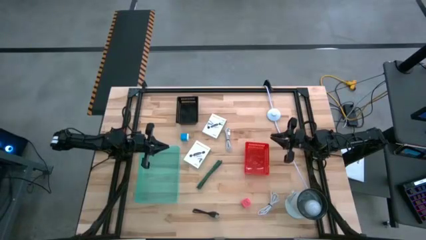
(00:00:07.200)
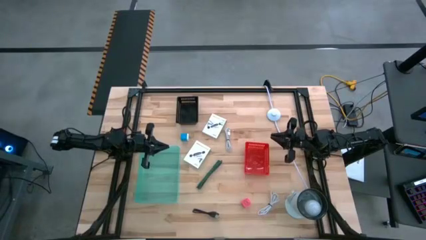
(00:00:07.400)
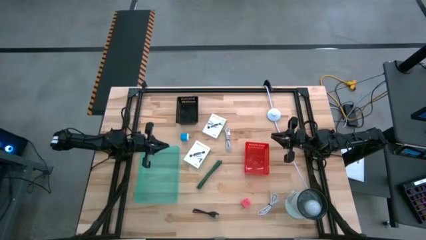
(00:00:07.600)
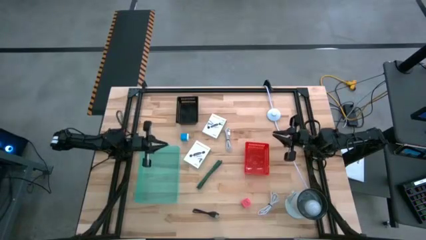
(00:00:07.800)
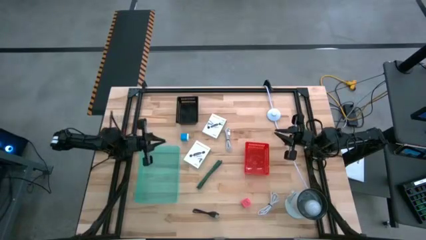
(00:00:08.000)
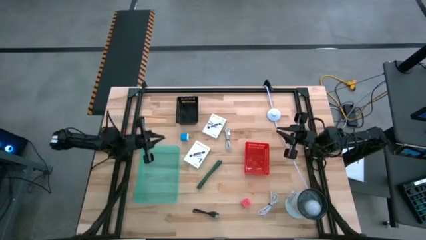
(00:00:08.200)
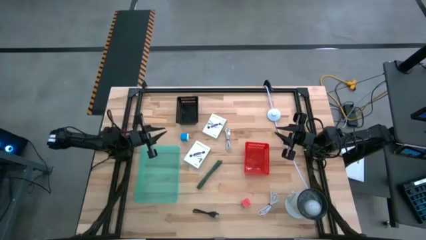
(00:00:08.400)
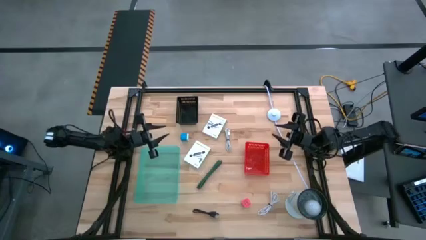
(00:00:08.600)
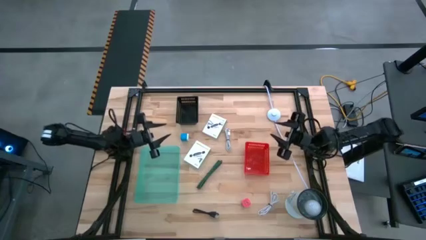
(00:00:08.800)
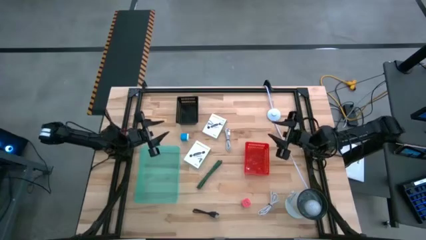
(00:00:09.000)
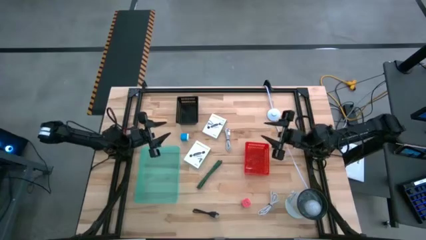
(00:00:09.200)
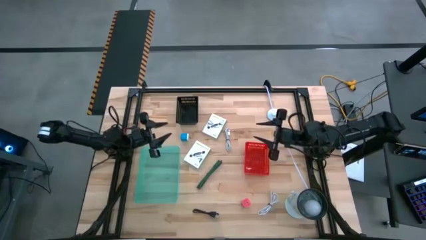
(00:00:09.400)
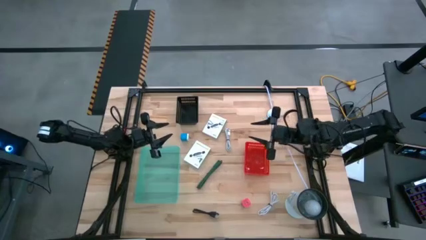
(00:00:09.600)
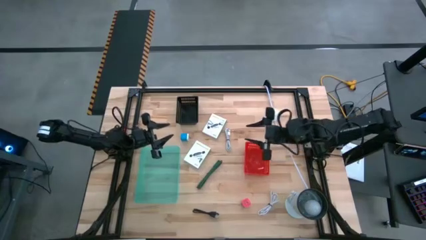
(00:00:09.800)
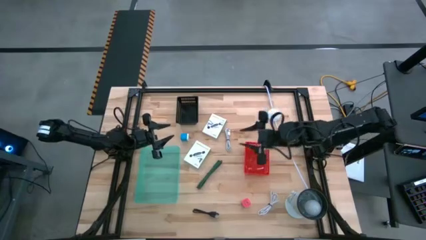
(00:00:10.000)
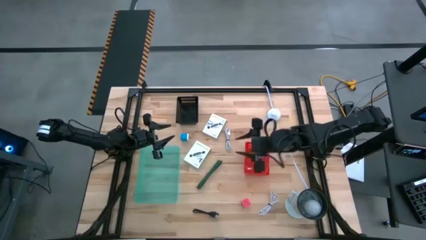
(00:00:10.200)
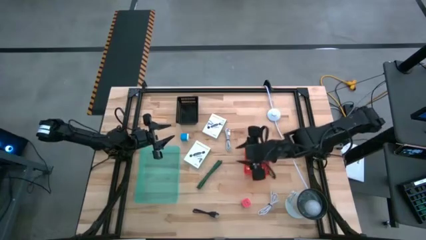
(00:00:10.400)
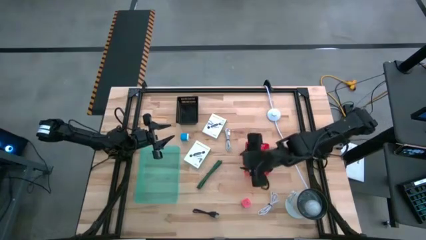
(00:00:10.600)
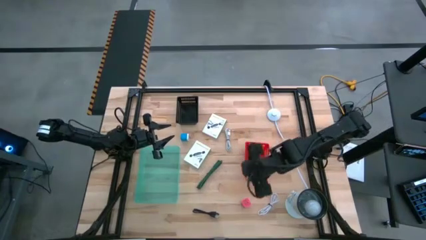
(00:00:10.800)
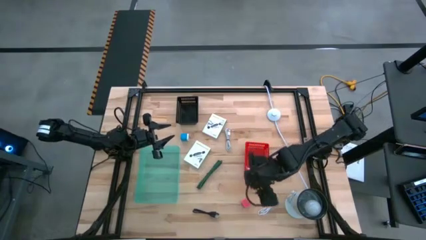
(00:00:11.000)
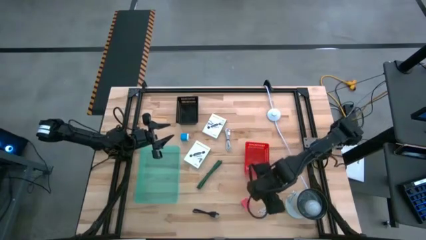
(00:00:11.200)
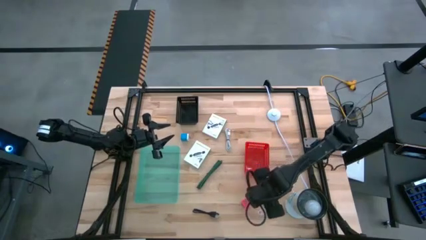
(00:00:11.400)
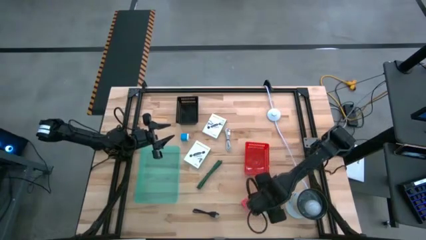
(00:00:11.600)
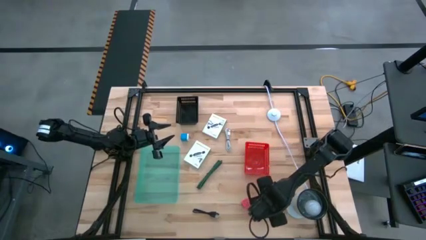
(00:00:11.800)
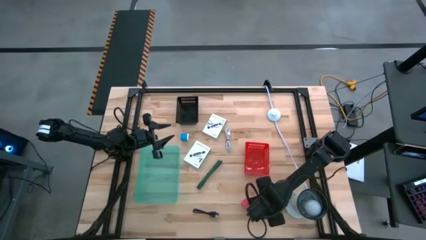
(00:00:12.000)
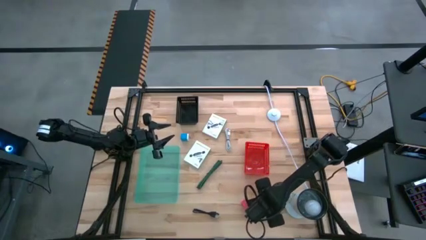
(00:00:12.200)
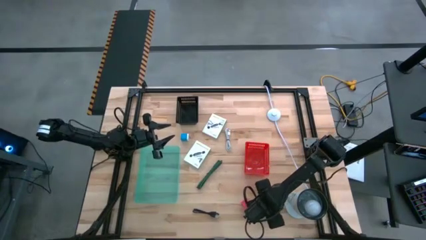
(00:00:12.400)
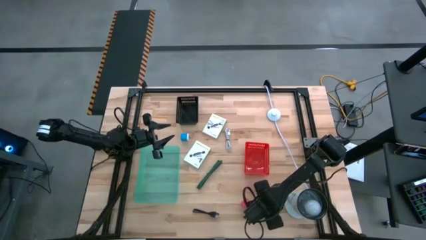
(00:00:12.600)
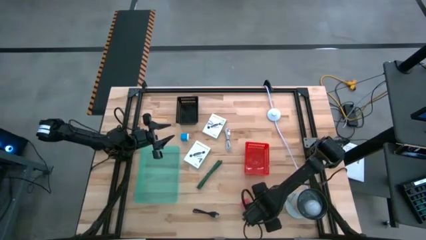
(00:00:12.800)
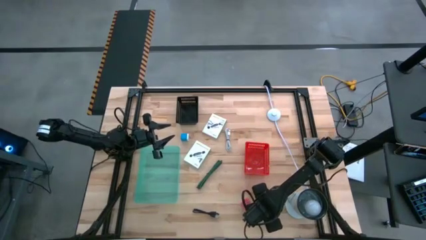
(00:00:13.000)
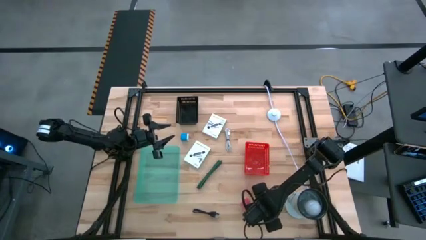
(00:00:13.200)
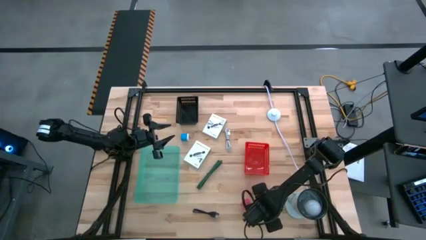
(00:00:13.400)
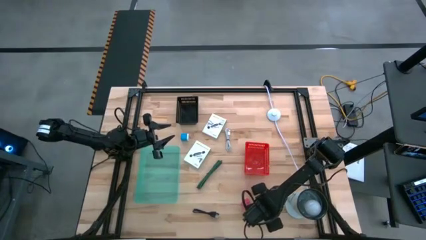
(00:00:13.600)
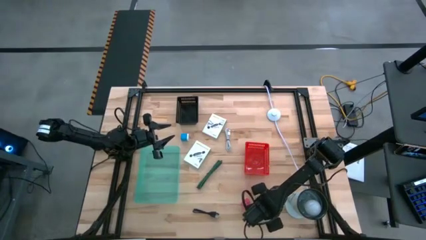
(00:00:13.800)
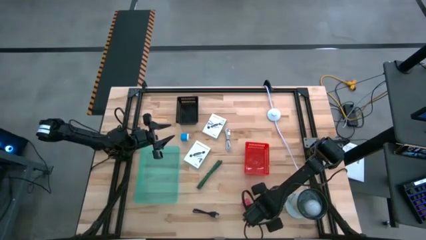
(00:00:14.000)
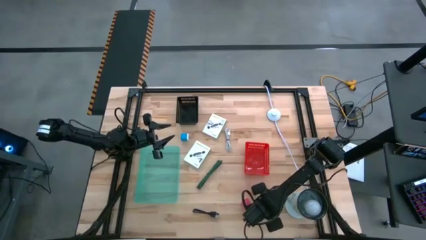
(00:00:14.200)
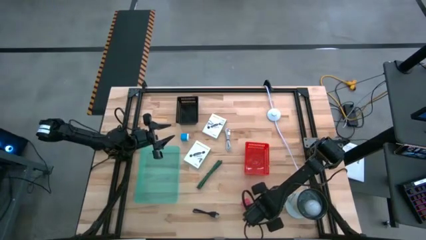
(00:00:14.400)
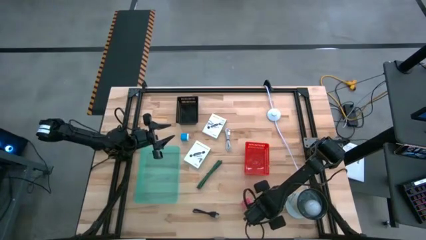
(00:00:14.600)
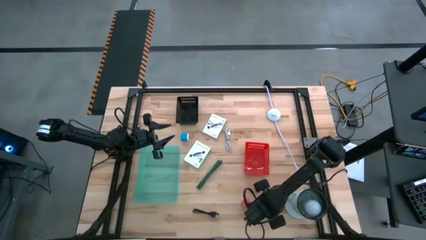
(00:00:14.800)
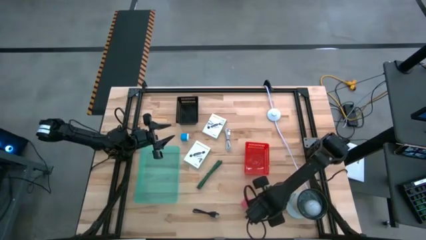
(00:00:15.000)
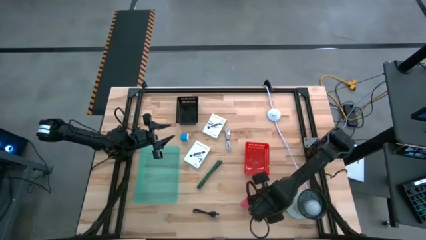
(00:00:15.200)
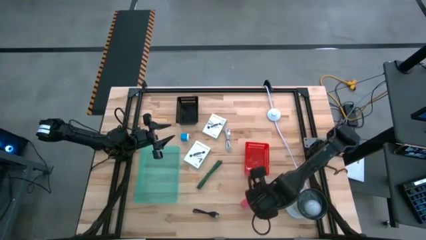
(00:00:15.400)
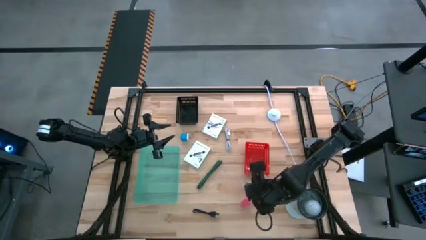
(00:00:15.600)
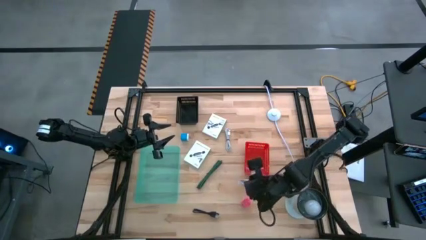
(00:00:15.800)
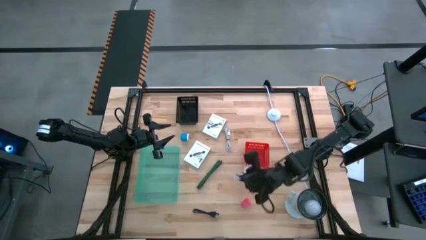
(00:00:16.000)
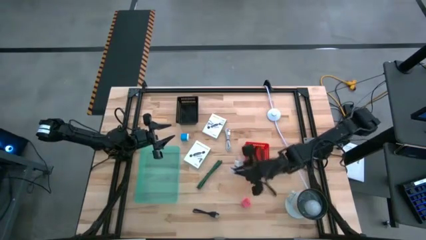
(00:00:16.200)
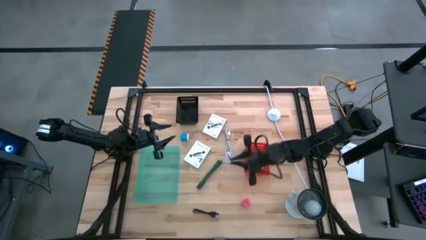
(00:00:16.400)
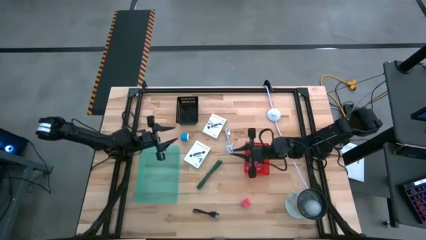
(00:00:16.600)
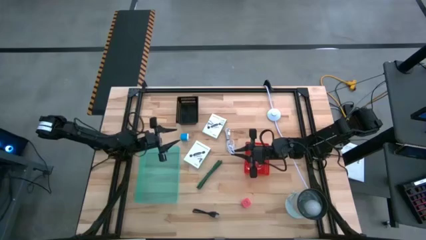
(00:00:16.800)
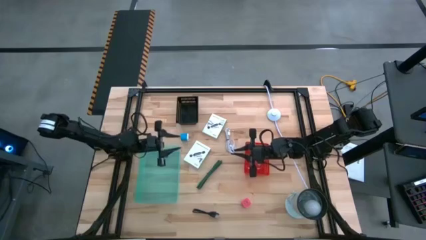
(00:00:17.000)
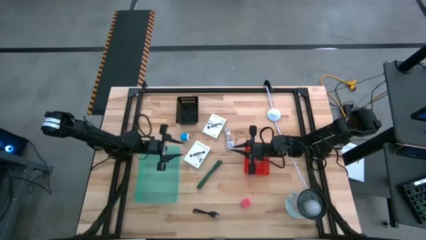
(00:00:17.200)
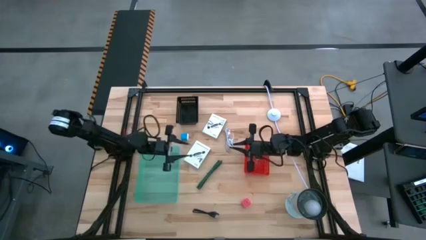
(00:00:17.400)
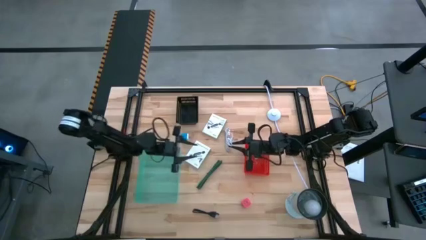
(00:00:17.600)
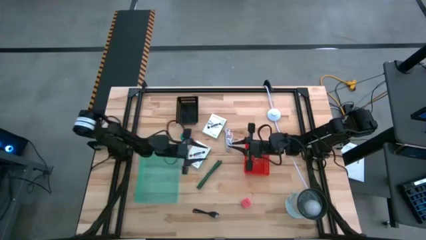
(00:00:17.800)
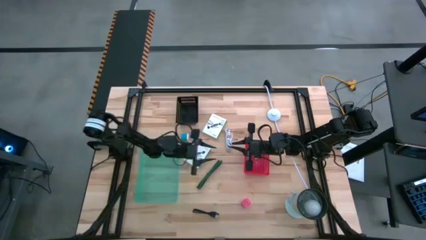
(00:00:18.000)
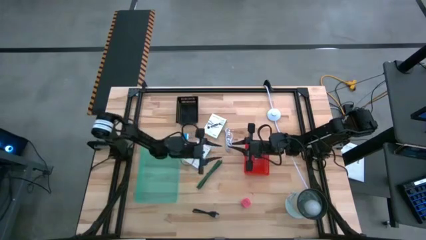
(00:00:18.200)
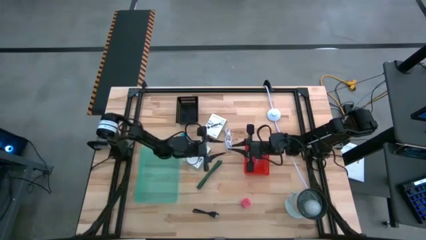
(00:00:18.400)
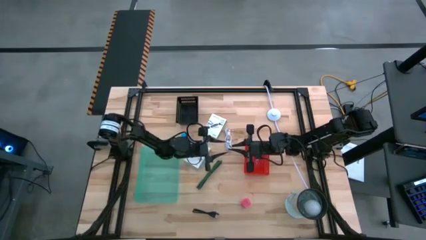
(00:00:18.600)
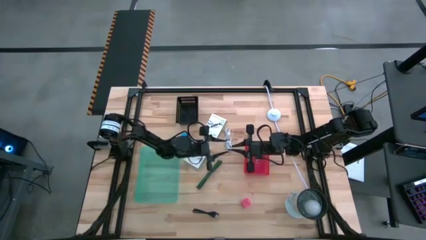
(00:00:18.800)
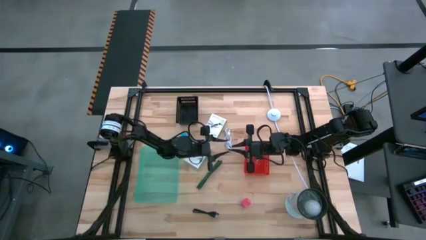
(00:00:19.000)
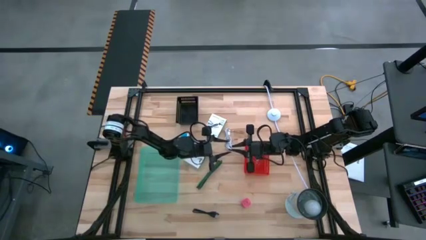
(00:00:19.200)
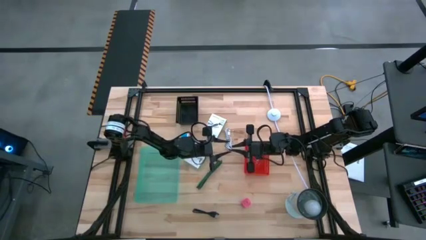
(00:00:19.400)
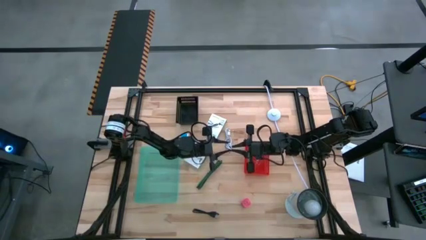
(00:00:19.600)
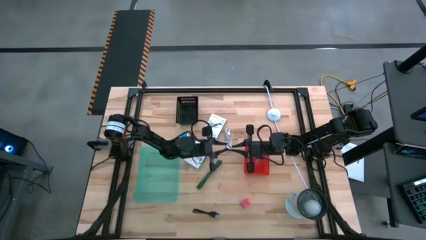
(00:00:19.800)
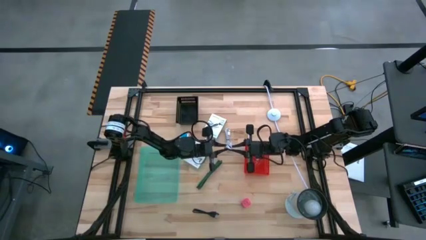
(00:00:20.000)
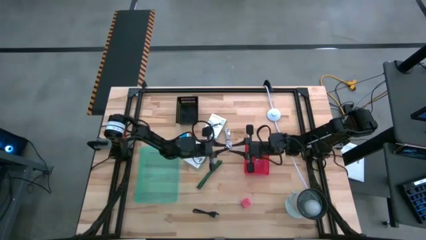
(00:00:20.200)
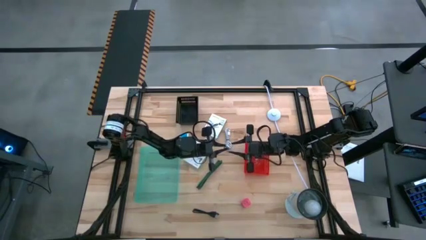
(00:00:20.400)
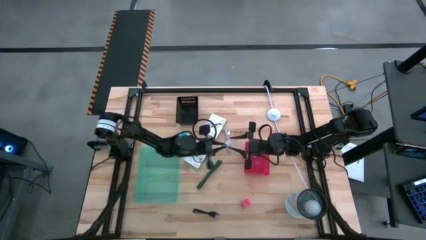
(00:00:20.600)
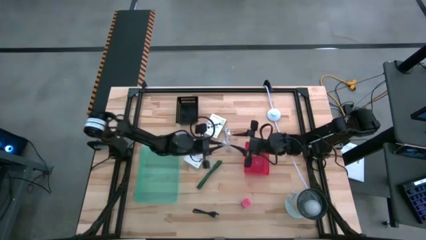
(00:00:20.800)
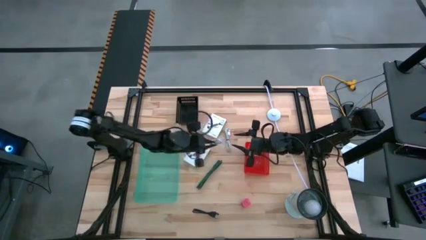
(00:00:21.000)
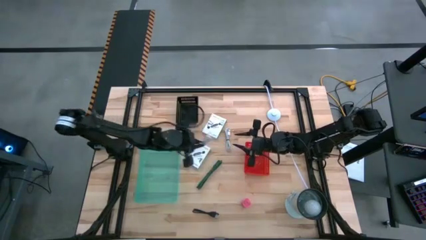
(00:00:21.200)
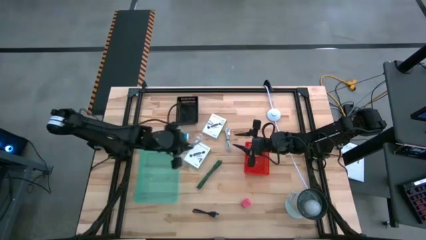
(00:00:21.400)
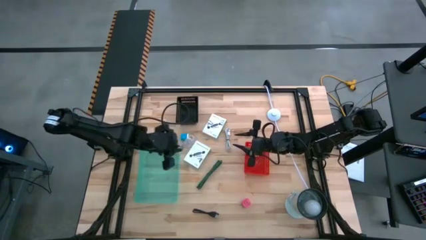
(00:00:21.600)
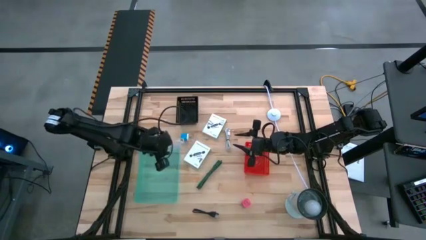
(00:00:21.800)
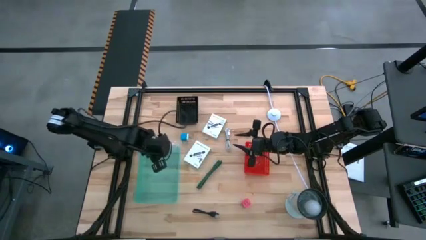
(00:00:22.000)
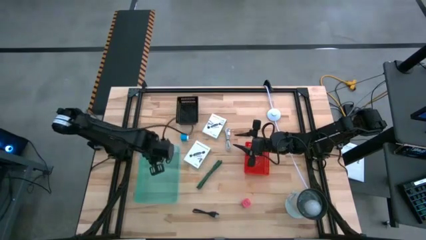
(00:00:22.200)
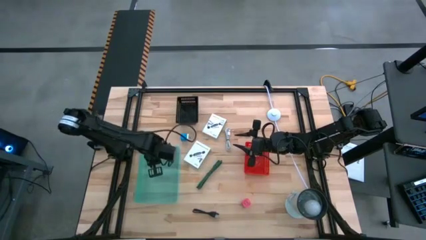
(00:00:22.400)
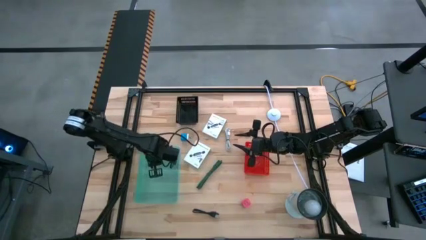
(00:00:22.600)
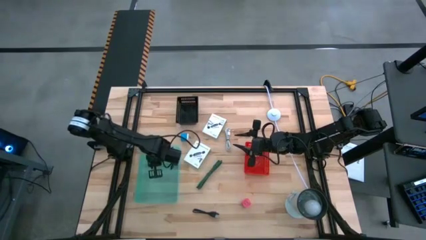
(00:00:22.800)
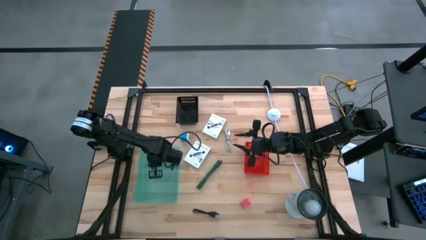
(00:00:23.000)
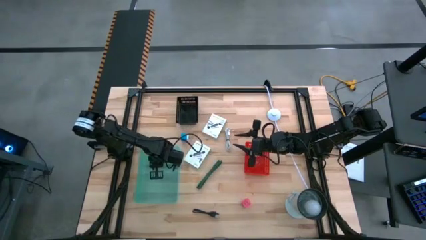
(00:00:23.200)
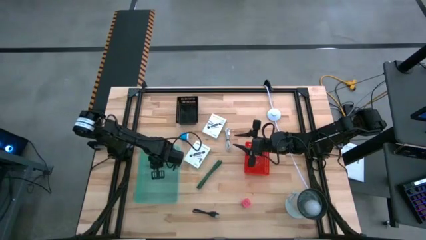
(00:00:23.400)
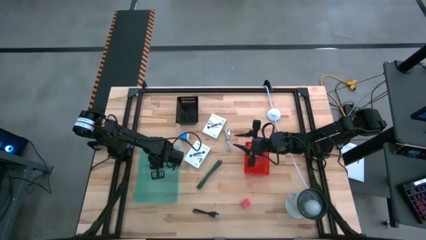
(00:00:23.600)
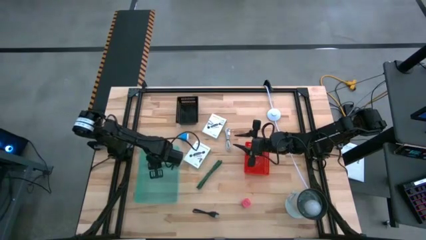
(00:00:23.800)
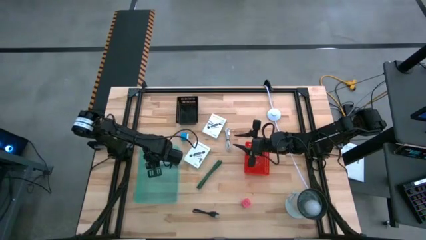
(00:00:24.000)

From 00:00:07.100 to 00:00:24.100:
Task: Pick and place items into bin
Put the bottom white USB cable into the light blue bin
